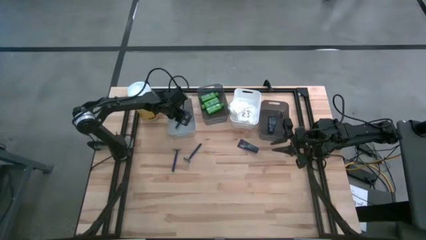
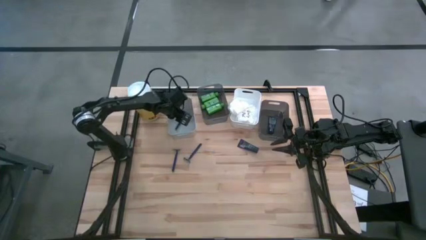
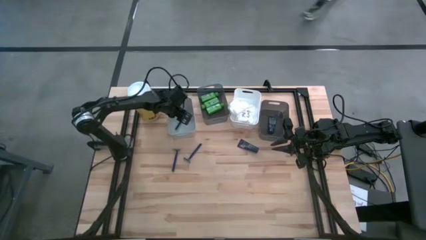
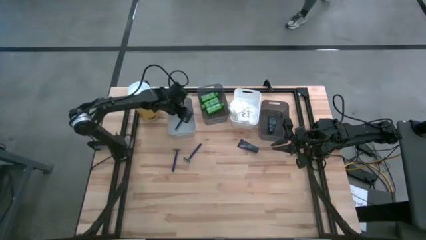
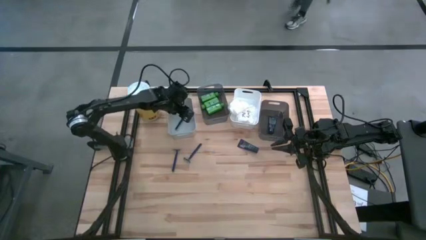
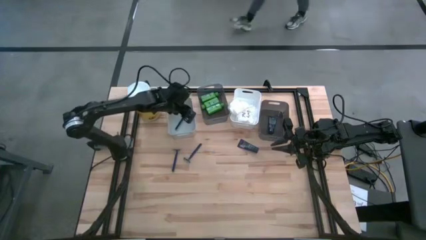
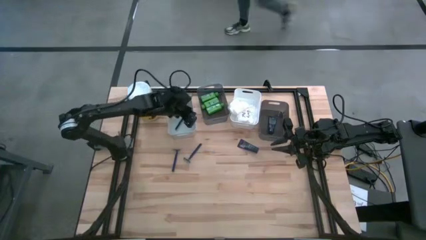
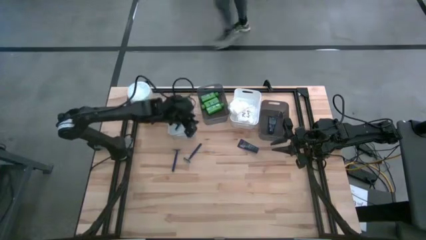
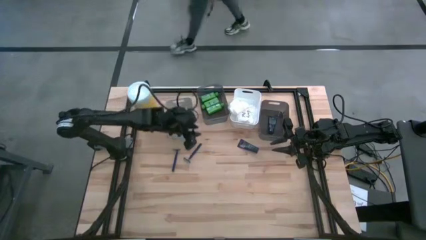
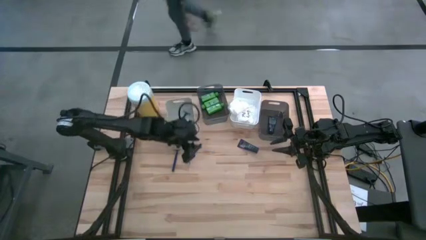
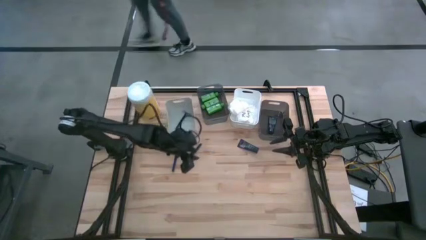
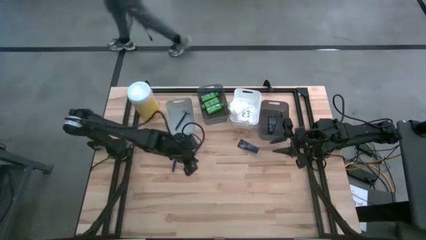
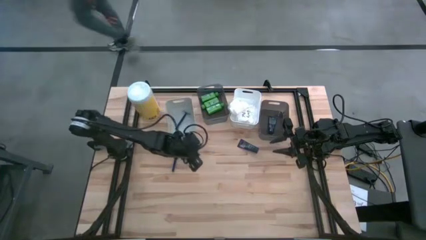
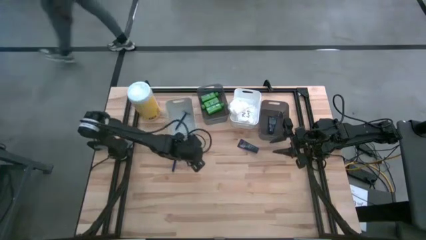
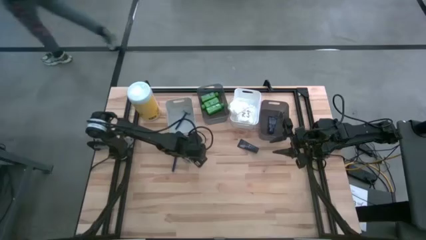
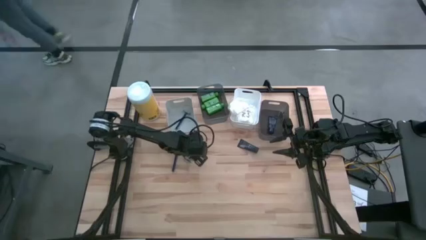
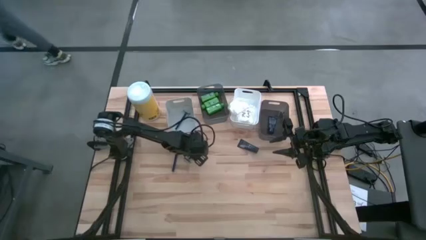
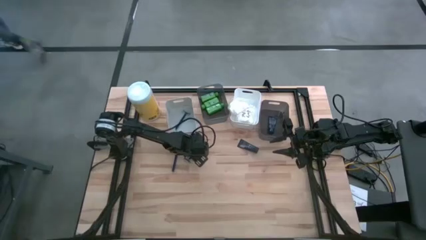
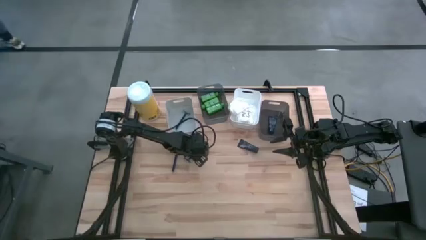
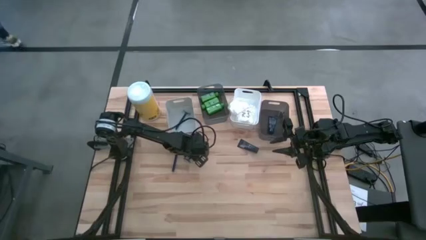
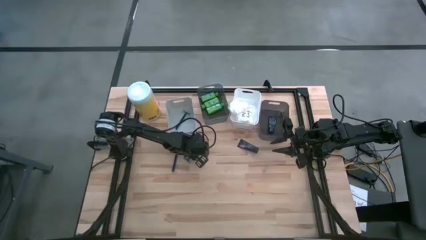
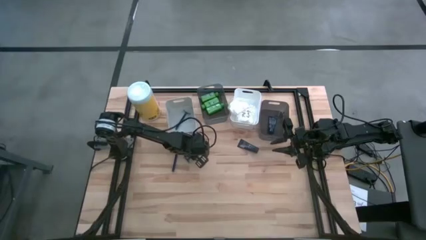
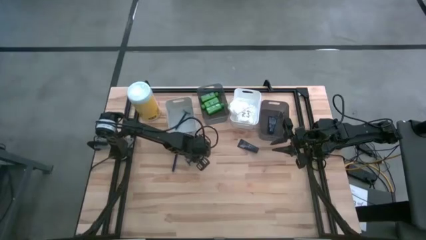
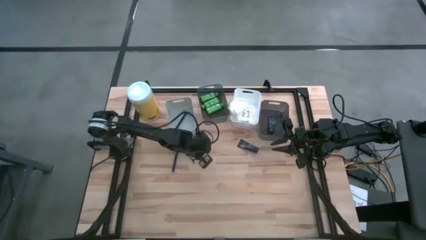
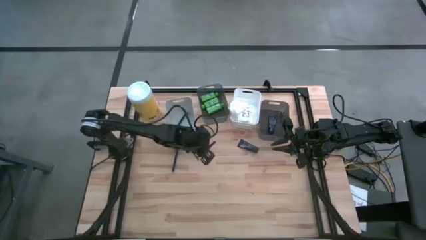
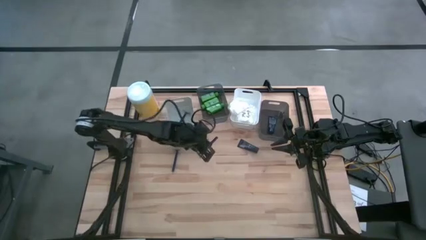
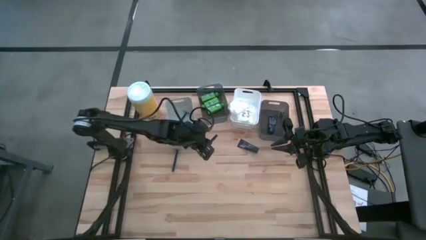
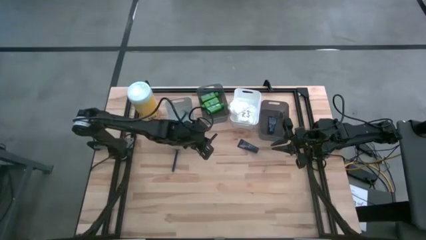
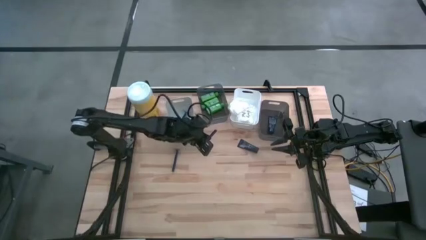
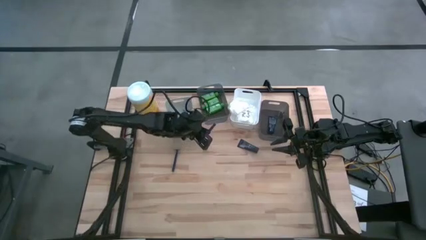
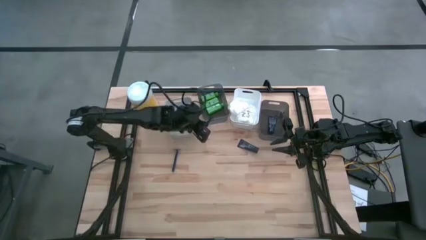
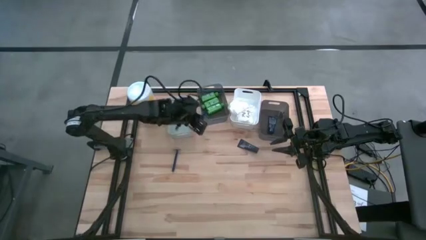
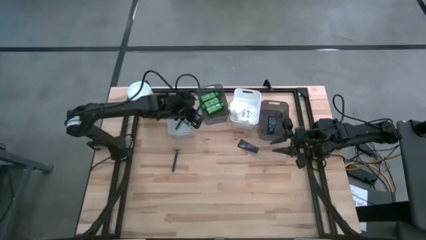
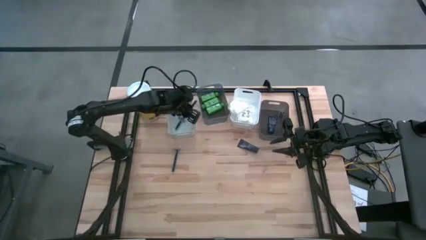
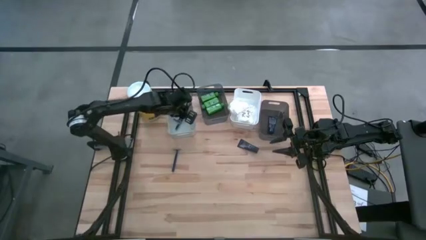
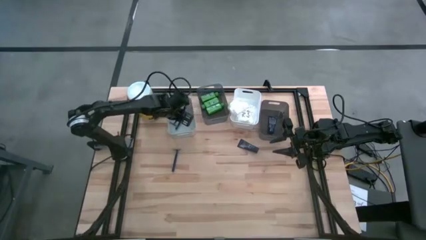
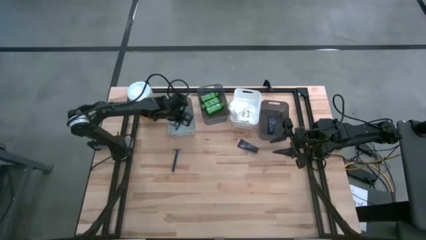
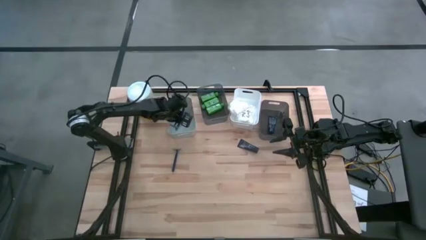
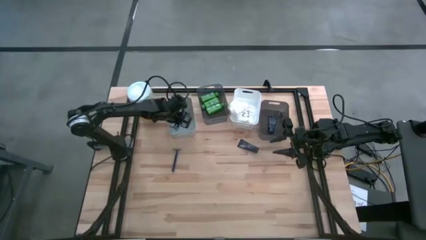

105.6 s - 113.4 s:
Task: Pick & Place Travel size toiletries
Put the blue razor into the gray bin

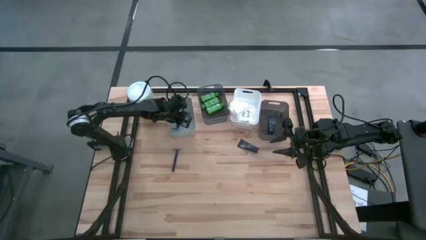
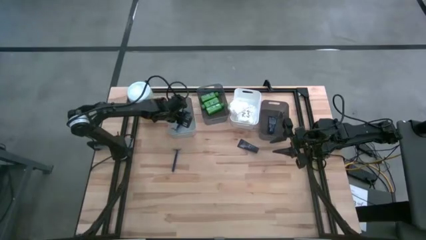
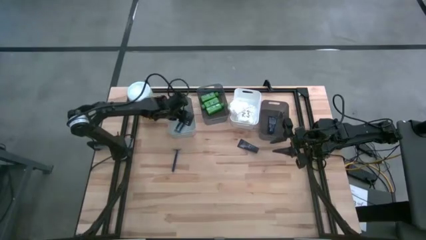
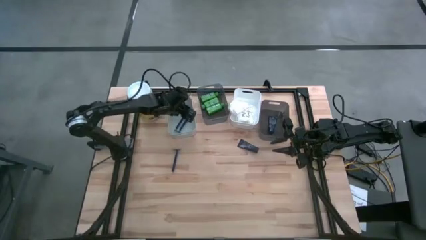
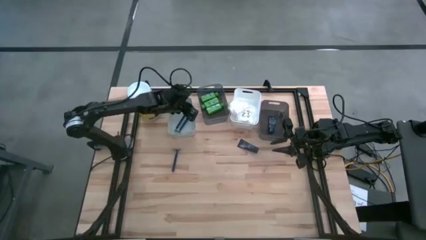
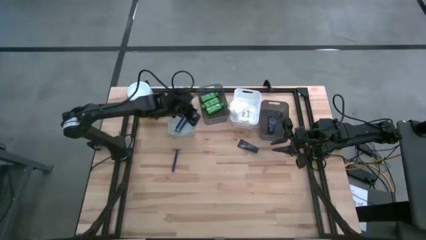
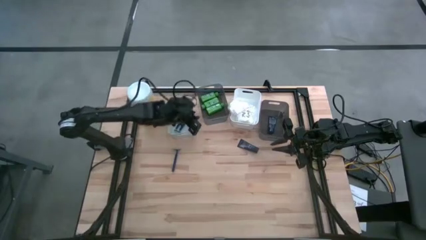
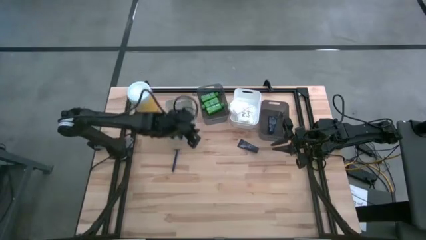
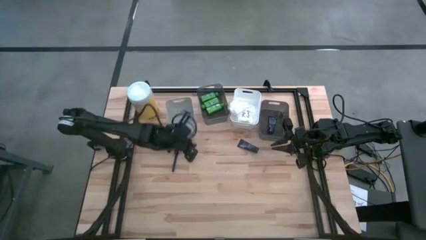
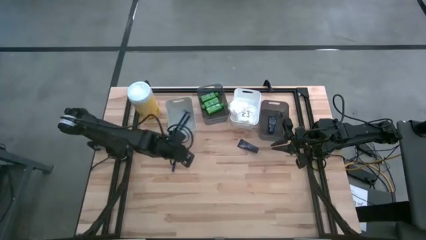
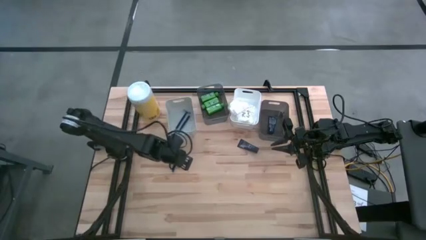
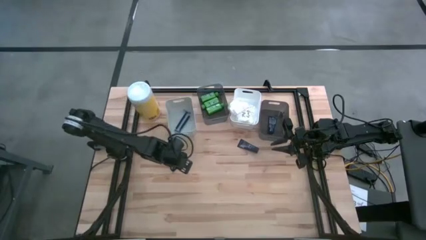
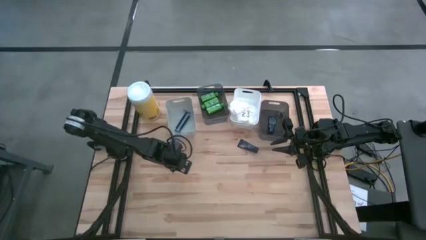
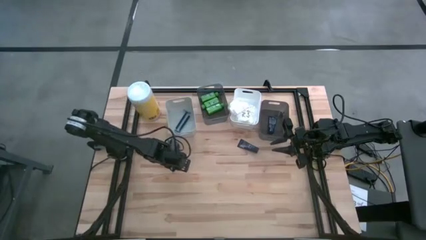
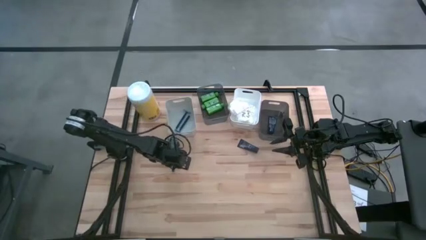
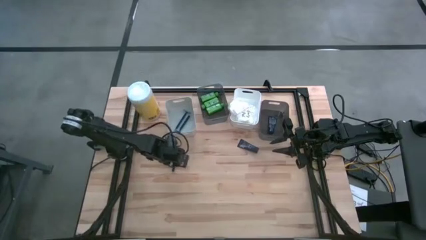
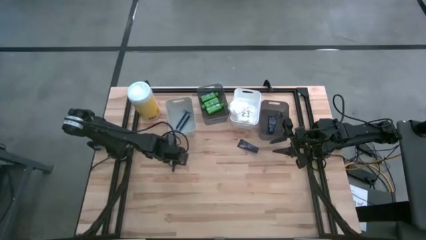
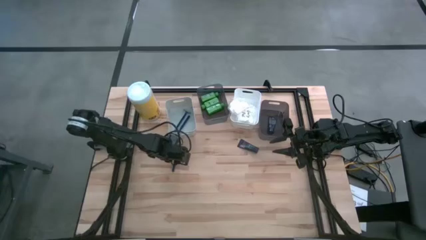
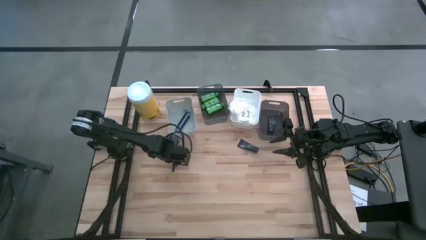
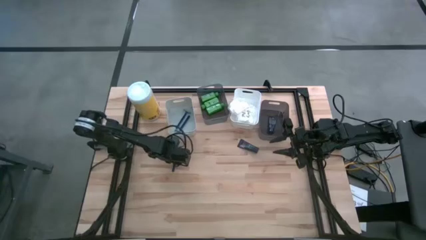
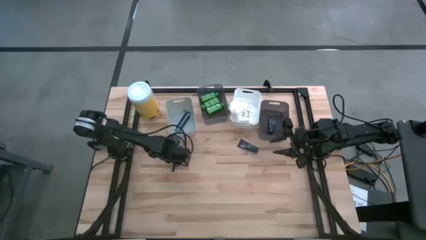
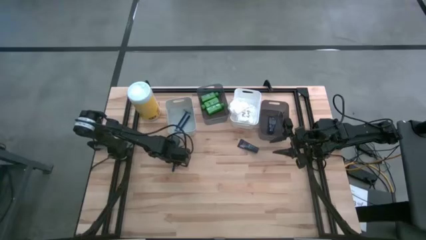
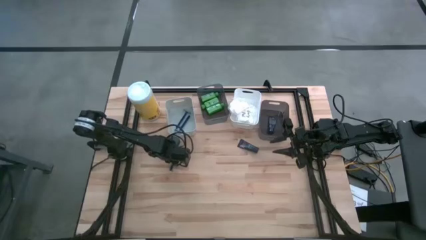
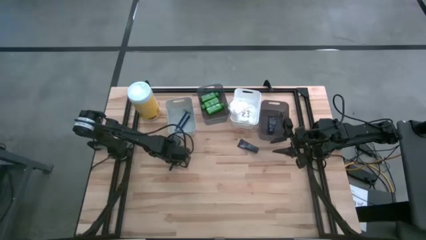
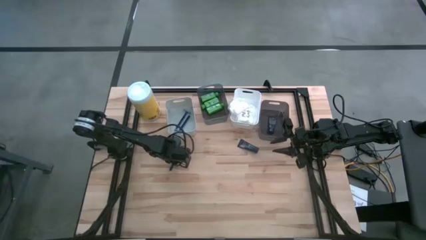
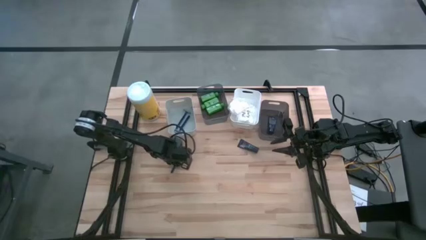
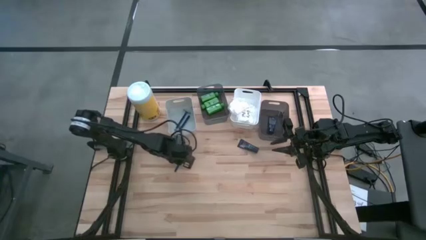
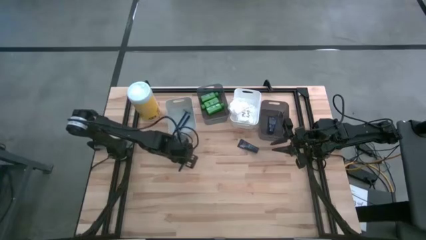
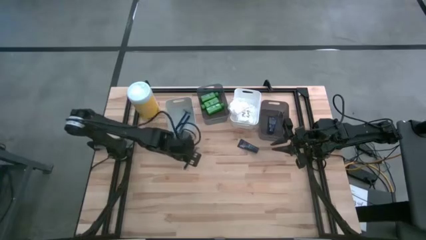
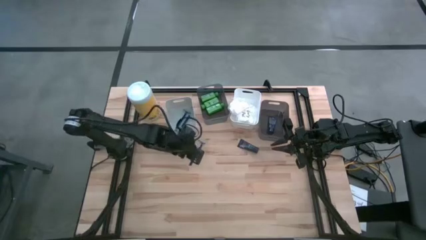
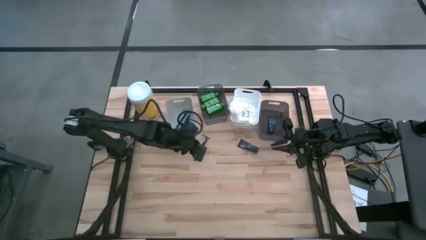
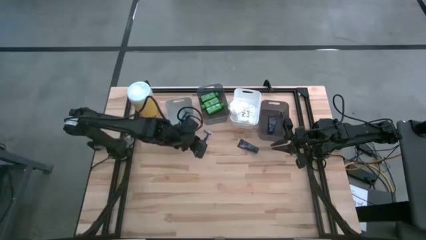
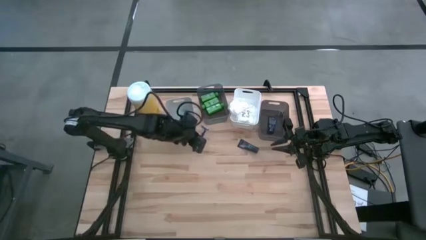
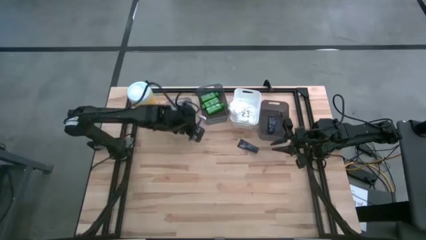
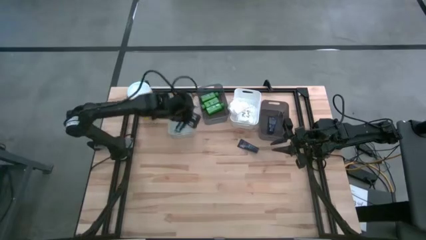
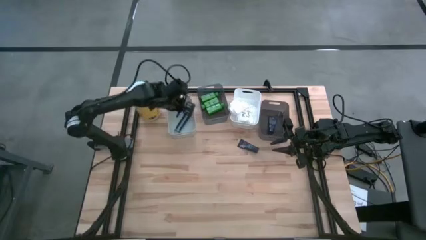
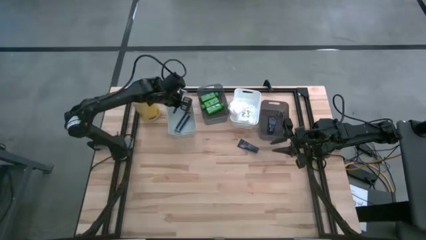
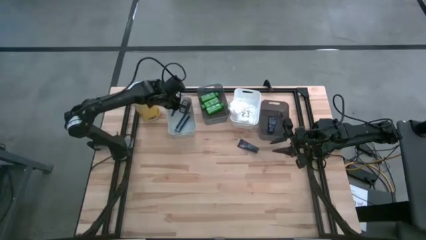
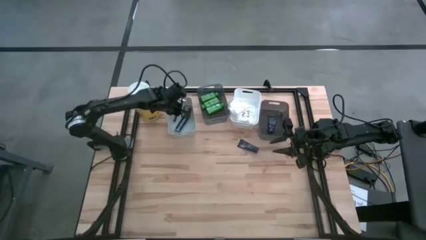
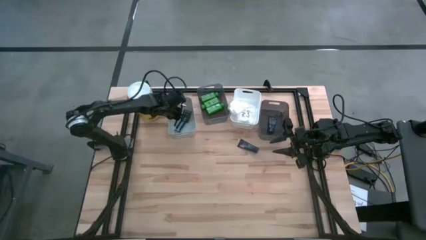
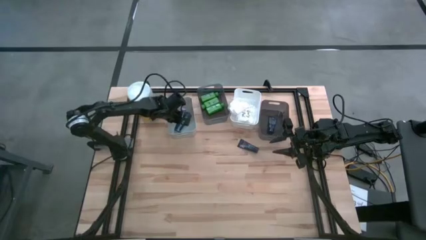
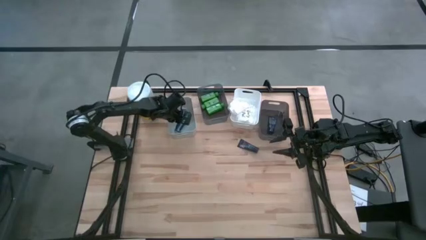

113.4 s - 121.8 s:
Put the blue razor into the gray bin
